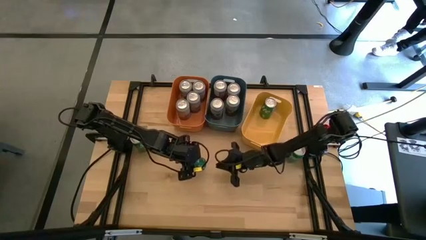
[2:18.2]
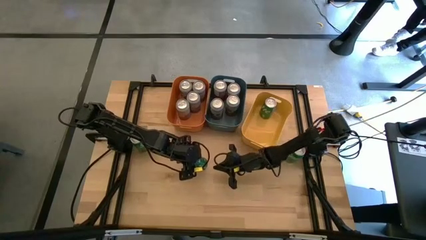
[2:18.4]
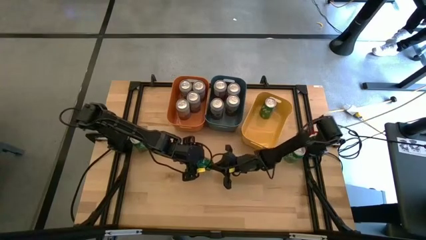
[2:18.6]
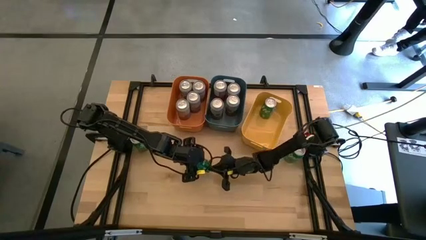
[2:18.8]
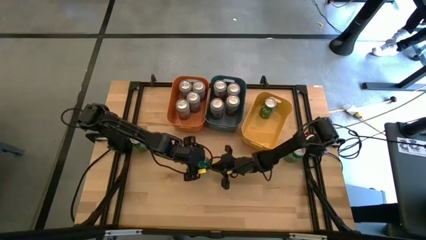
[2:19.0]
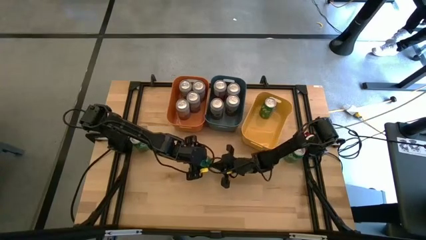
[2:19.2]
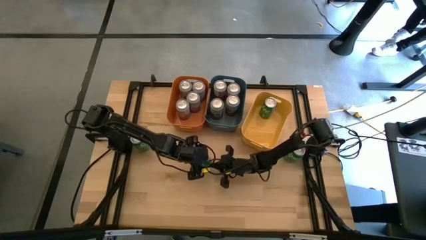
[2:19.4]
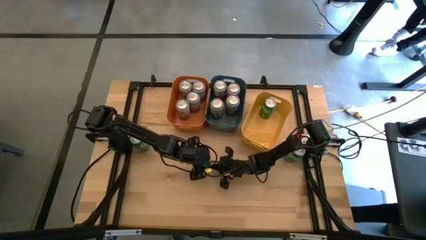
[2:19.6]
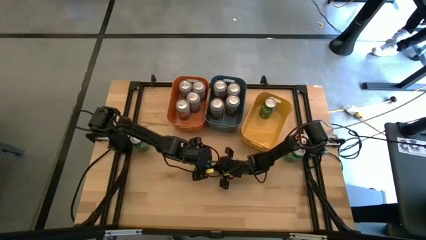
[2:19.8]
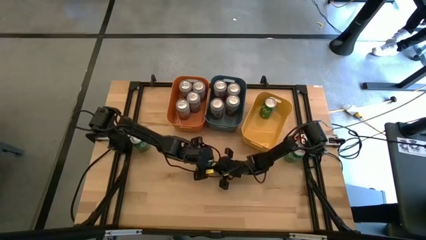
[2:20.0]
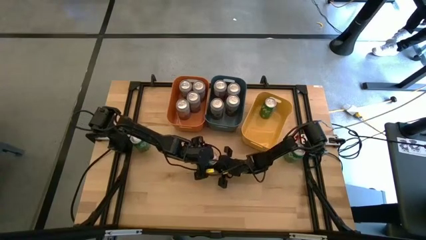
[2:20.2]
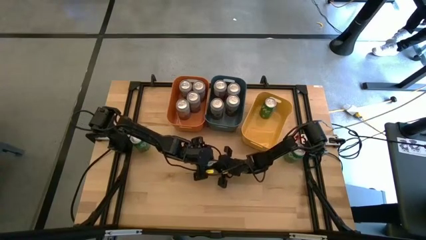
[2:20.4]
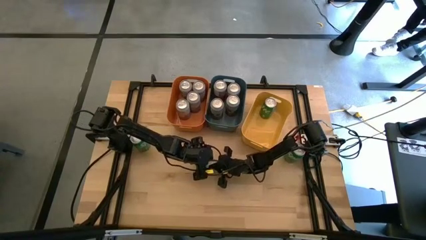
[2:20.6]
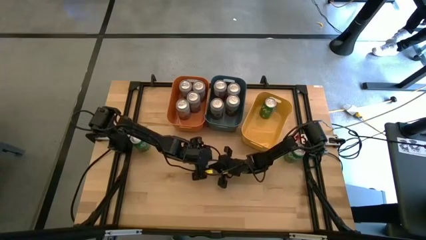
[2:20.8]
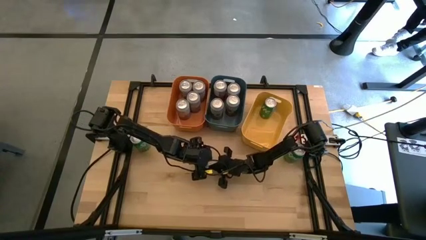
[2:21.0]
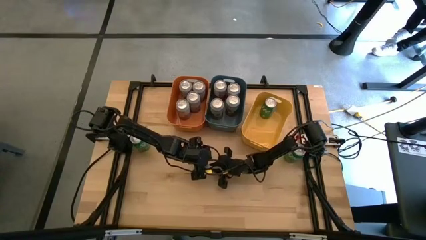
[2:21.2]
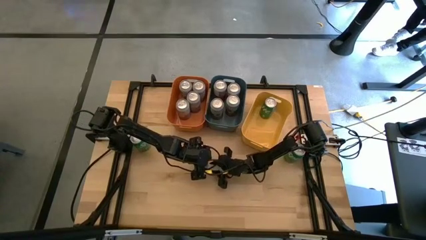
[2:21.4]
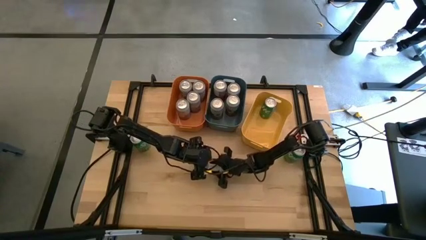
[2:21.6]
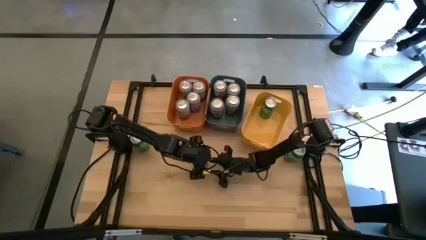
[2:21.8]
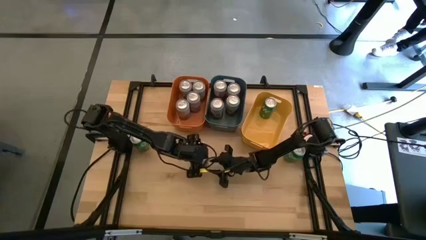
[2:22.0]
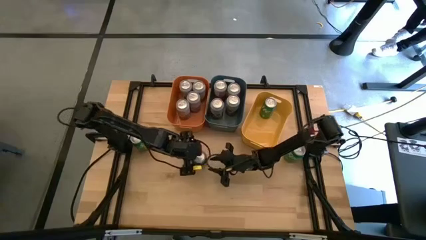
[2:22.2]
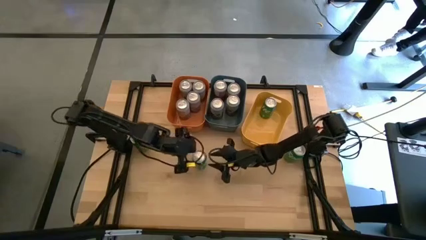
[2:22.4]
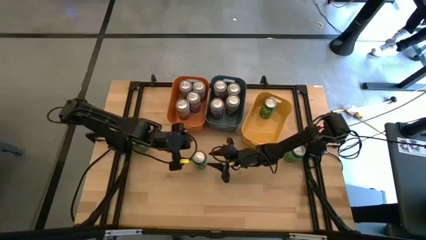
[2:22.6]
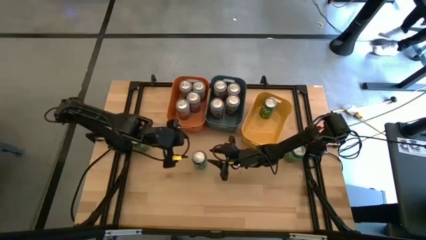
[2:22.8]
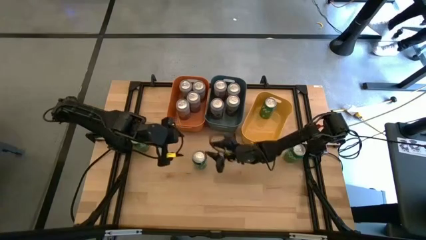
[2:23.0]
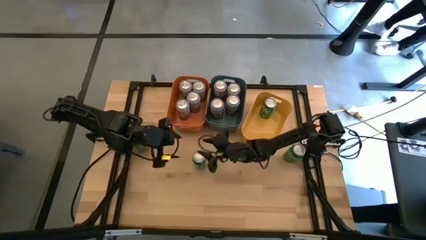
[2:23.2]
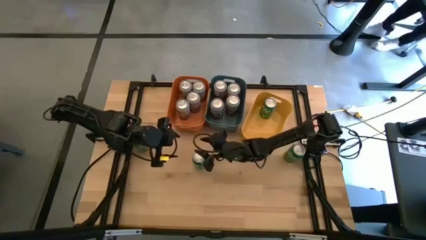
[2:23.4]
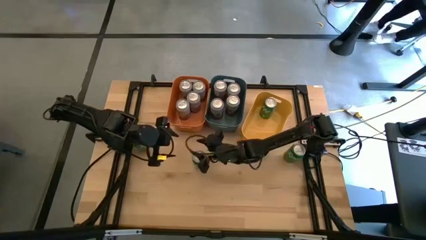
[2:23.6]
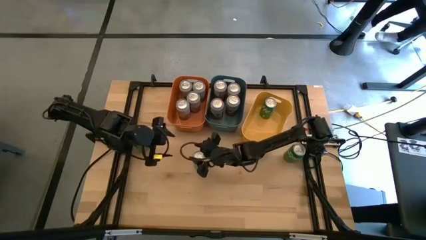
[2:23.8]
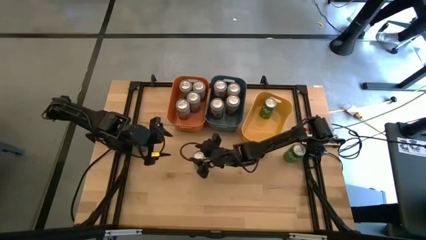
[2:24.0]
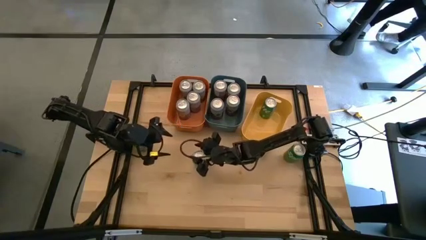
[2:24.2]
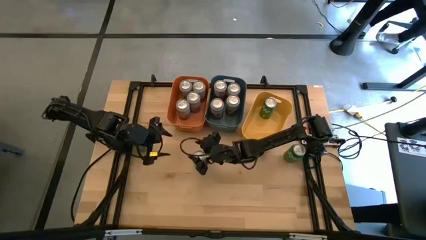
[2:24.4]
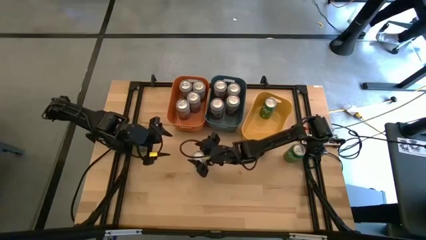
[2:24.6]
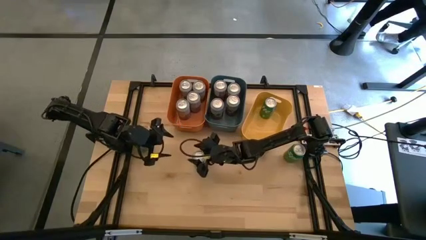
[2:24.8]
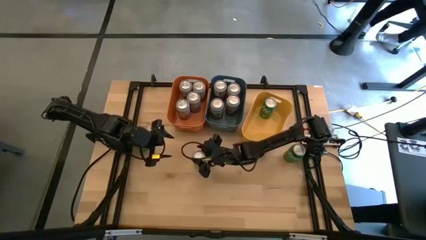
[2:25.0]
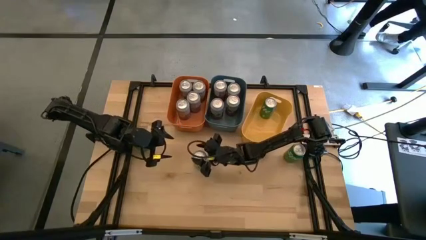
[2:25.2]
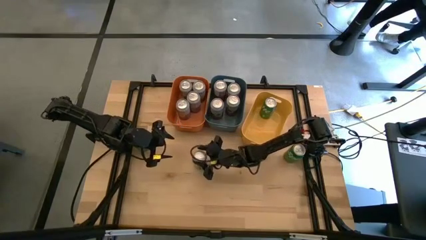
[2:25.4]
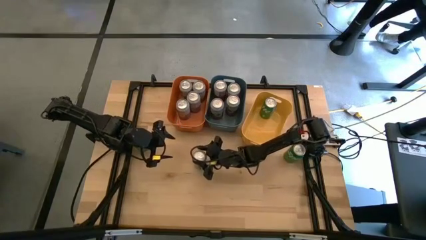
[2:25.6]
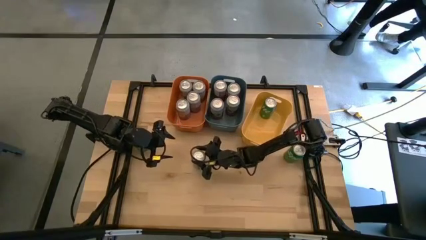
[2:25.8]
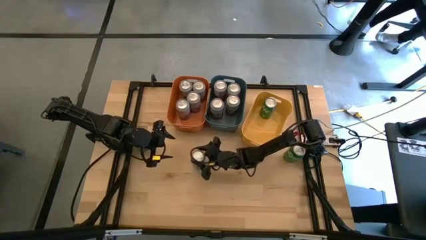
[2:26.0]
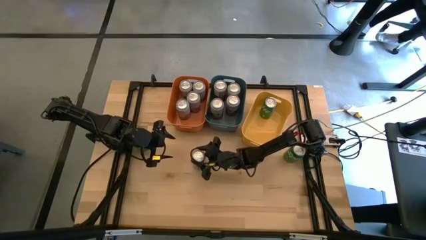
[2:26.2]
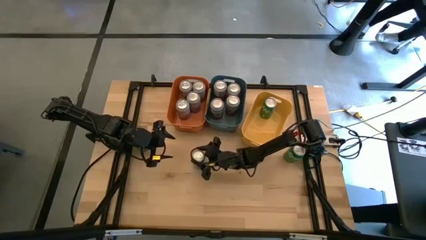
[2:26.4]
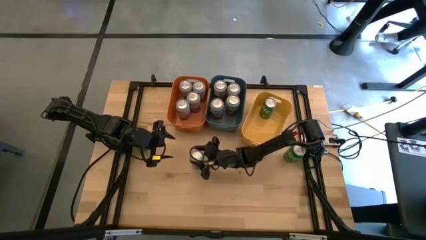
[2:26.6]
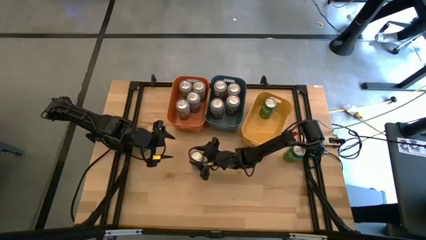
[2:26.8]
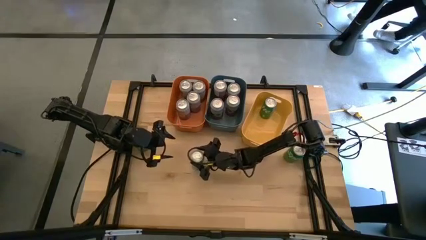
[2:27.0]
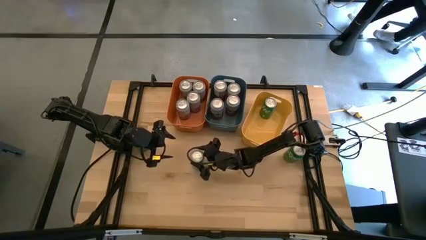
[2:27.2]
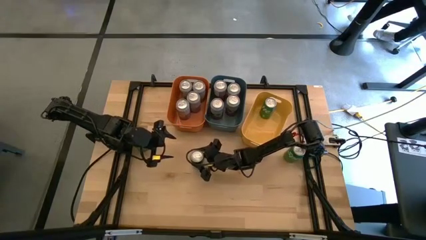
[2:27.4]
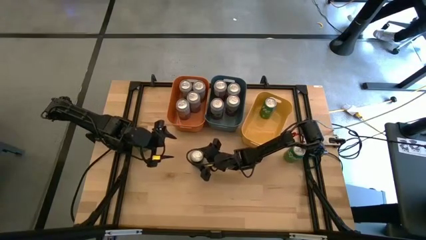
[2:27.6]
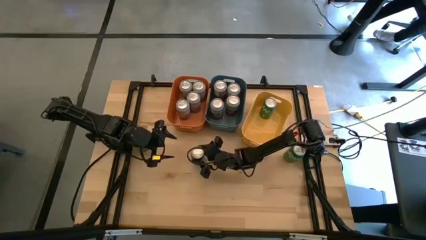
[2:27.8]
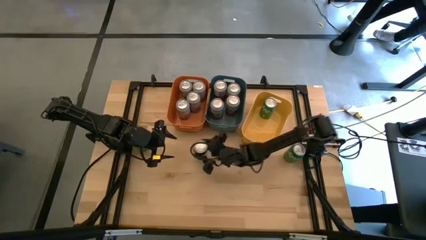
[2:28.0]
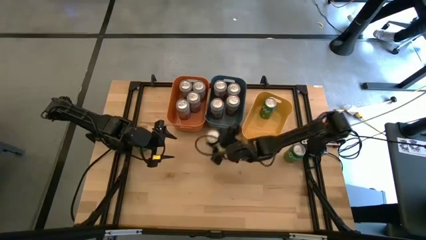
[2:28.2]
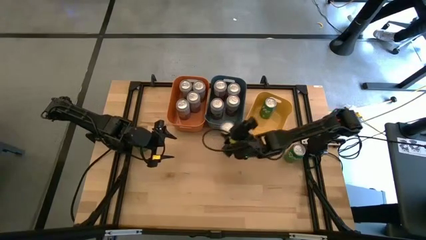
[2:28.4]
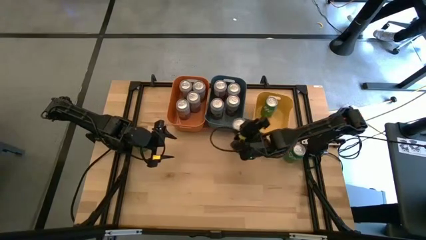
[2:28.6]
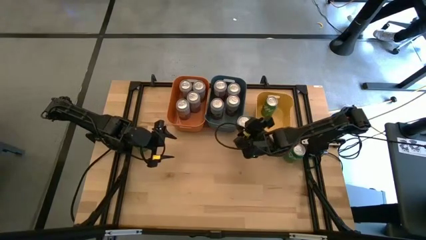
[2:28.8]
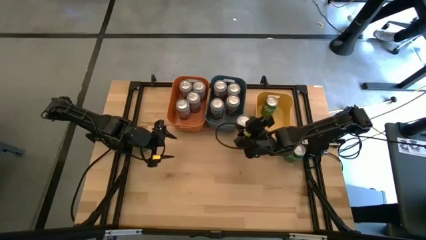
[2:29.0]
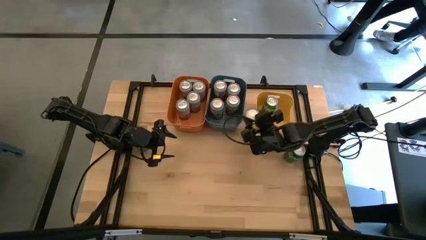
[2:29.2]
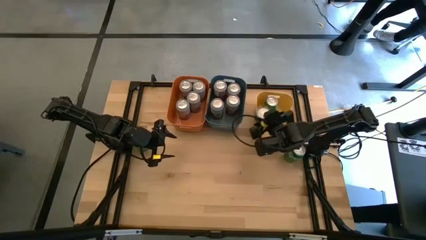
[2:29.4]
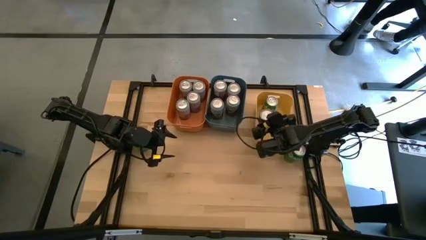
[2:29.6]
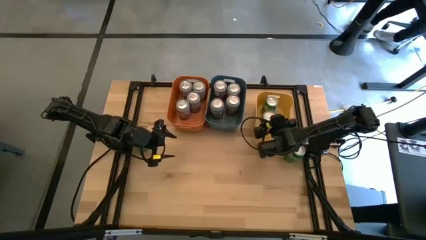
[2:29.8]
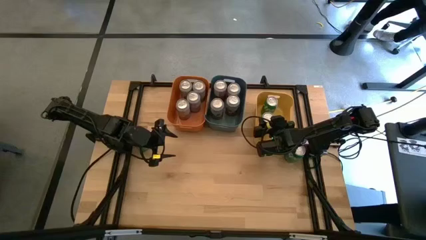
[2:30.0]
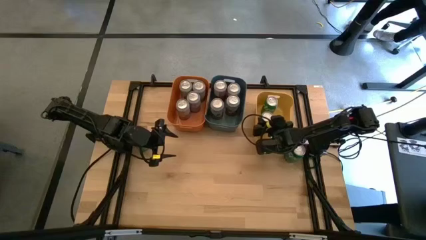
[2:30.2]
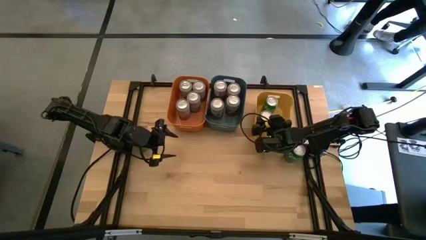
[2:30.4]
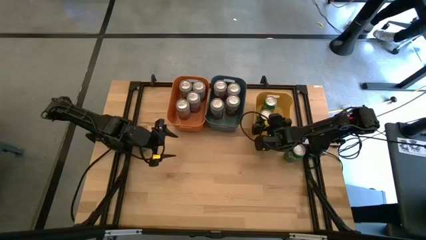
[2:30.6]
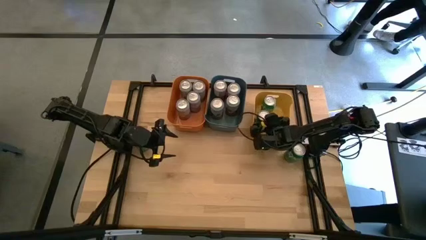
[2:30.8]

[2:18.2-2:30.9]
Task: Sort soda cans
Put the top green soda can into the yellow bin
